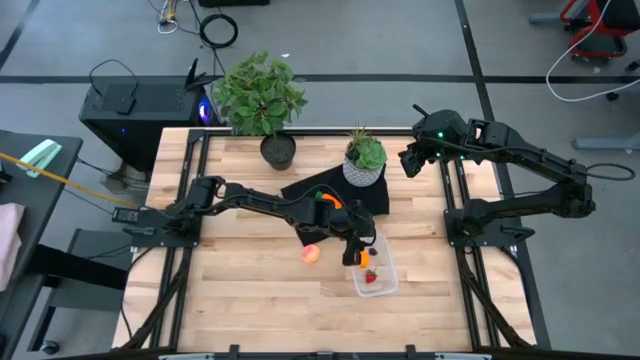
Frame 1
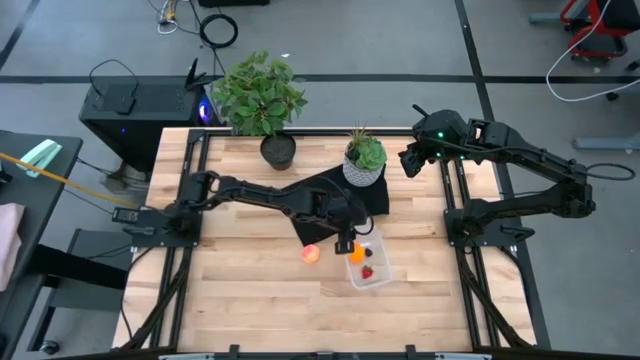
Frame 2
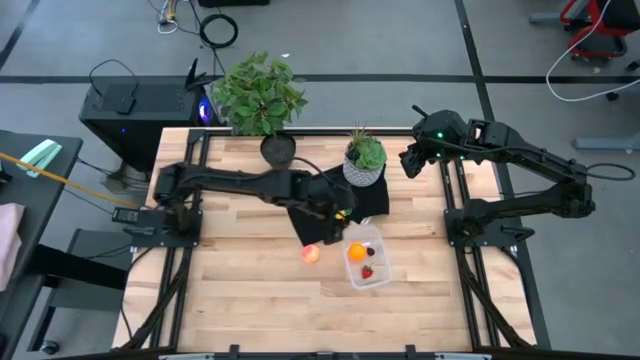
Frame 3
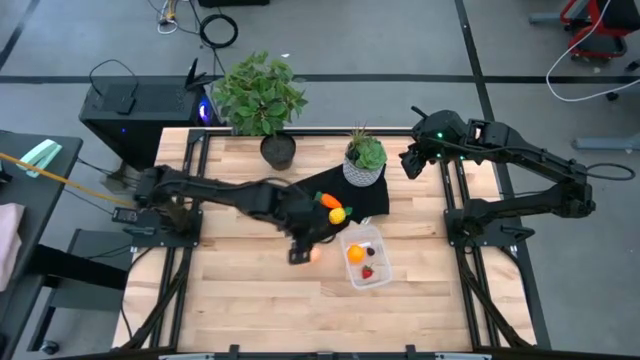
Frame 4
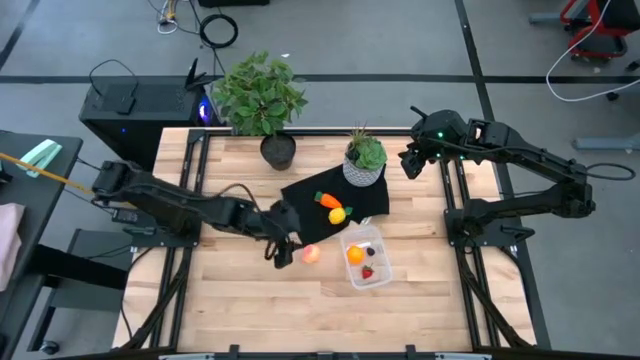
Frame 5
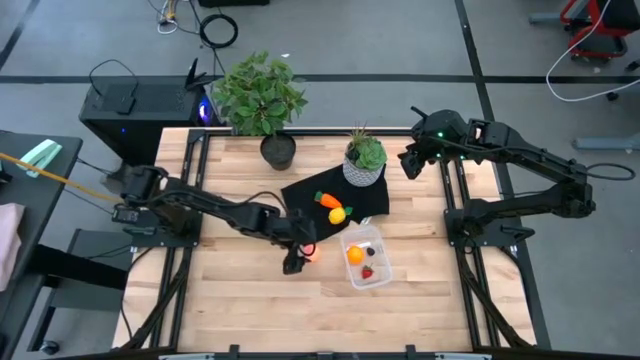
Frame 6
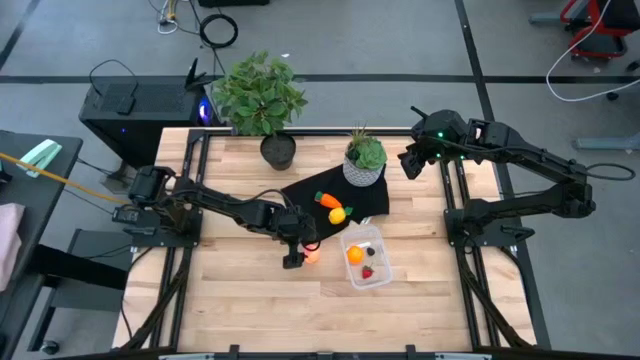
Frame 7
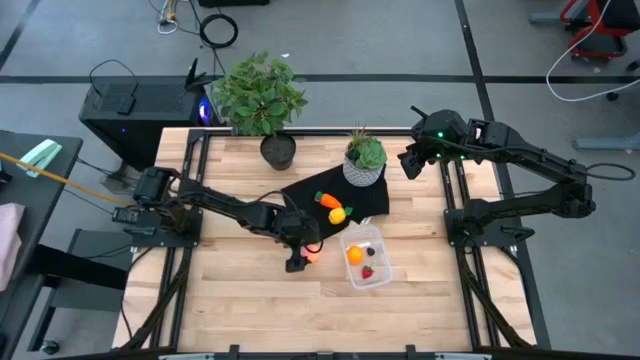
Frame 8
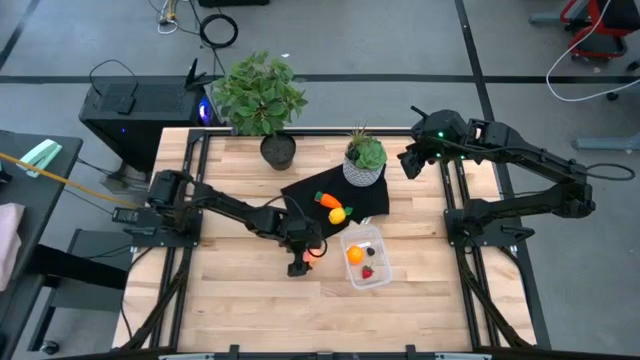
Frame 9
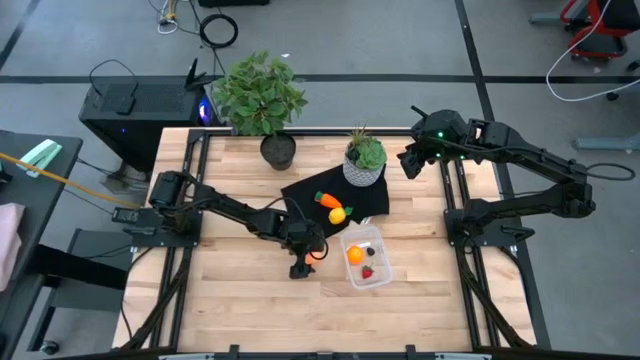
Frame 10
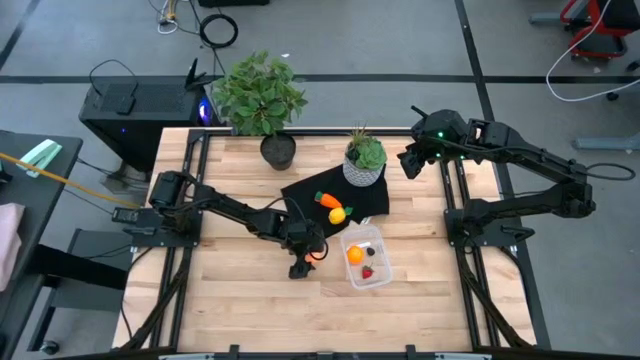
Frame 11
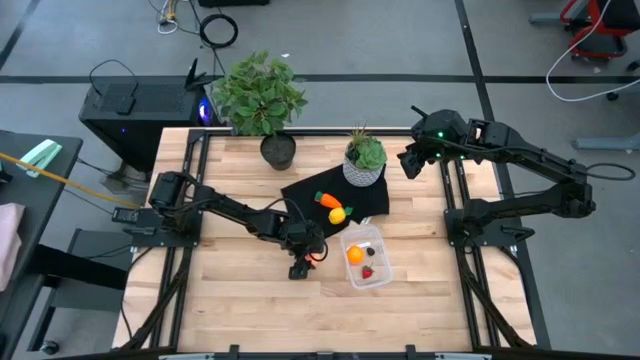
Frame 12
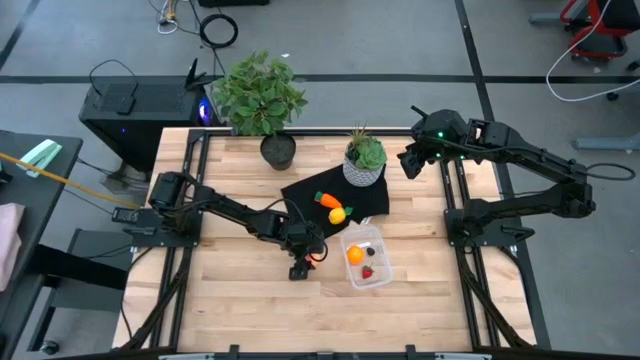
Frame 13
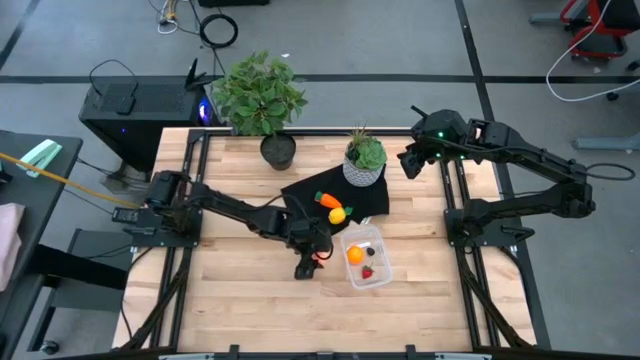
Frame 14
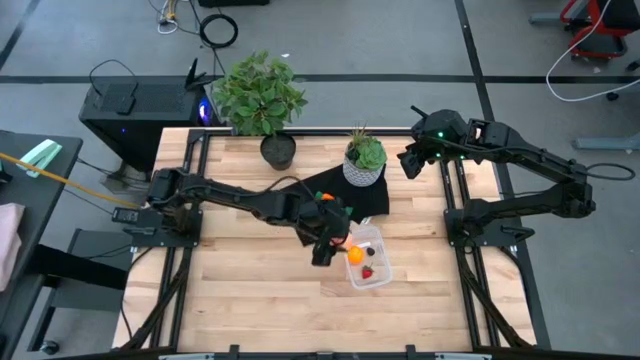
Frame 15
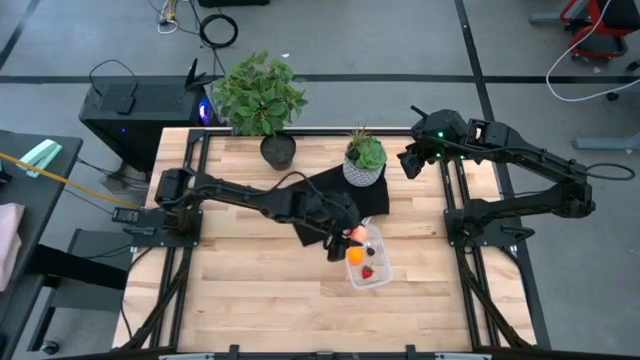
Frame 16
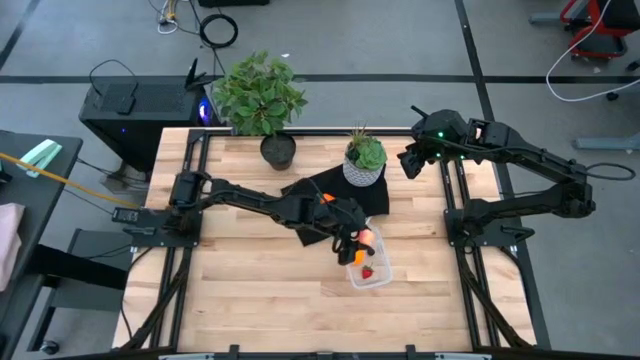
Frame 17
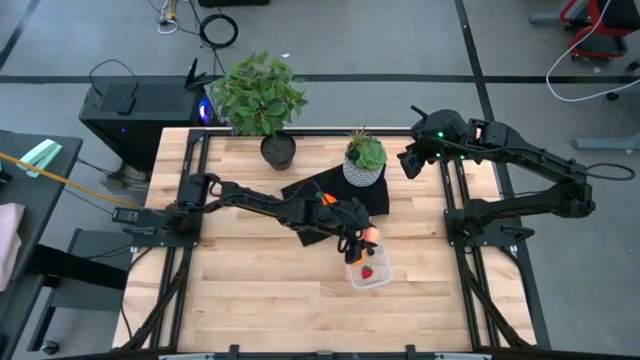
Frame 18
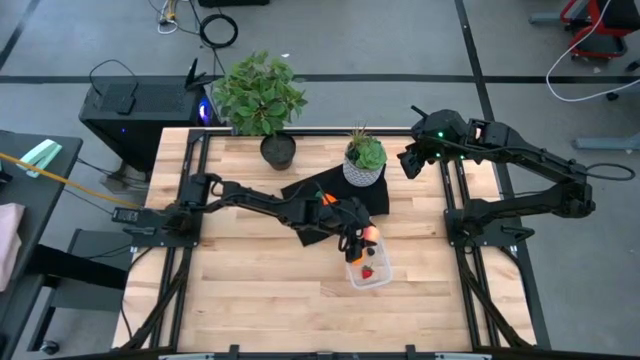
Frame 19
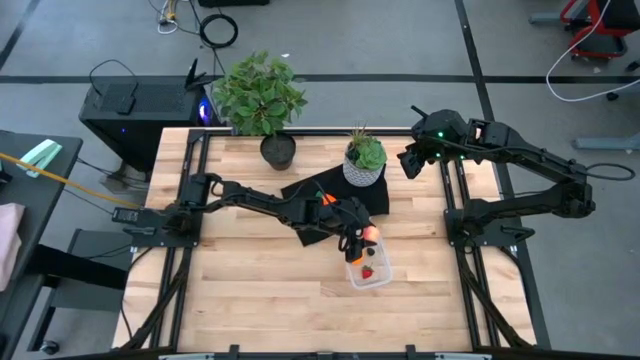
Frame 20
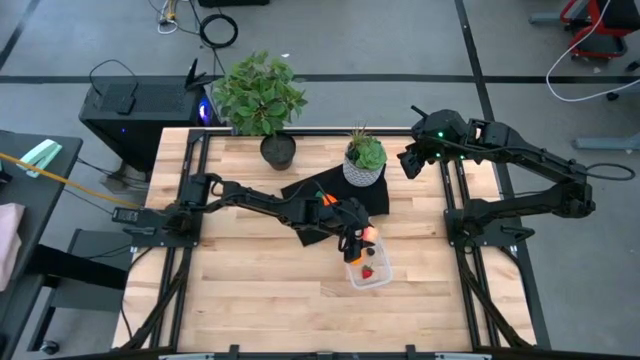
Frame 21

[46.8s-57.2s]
Task: Pick and placing Produce into tupperware
Put the peach into the transparent bin

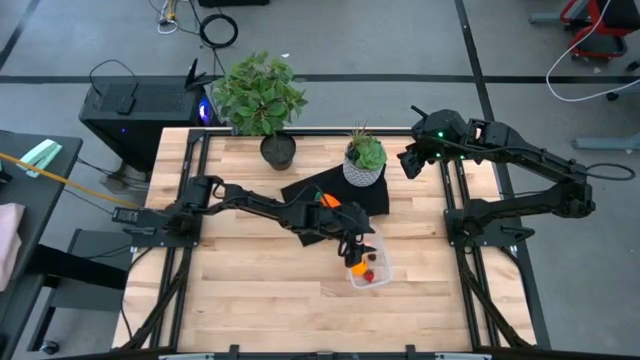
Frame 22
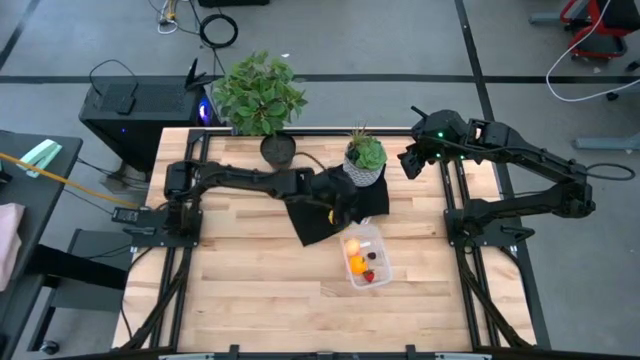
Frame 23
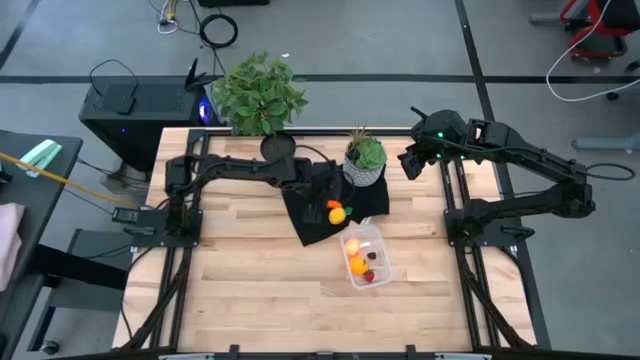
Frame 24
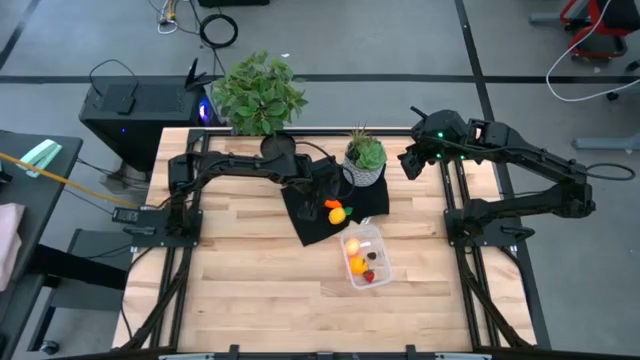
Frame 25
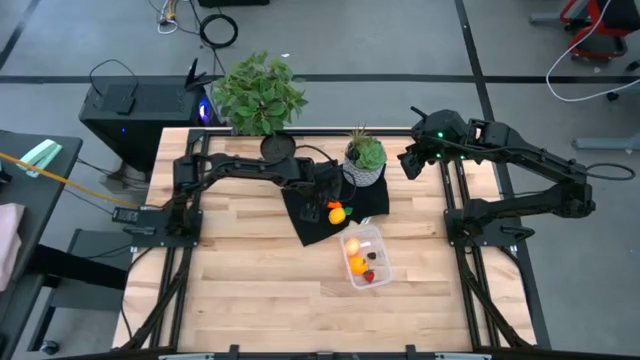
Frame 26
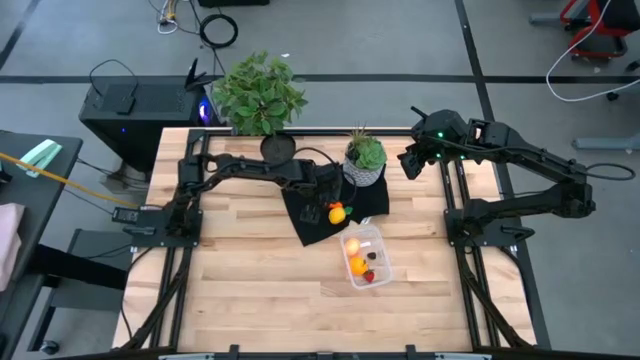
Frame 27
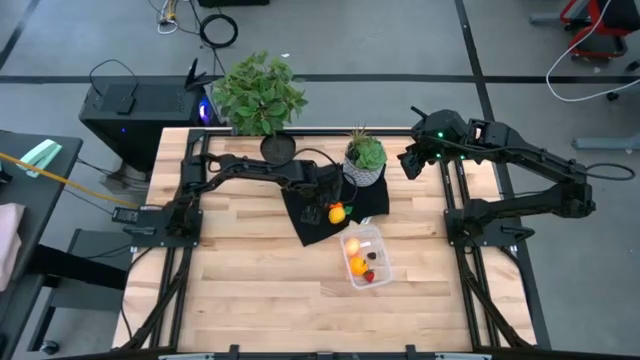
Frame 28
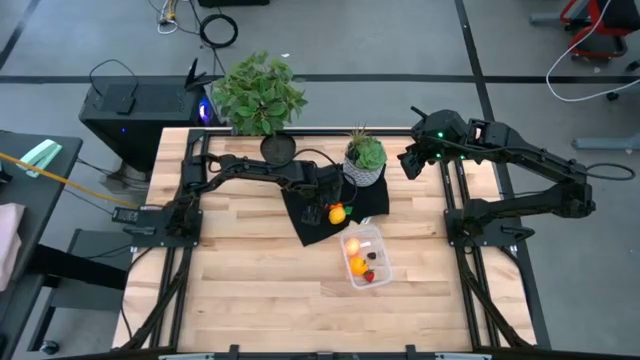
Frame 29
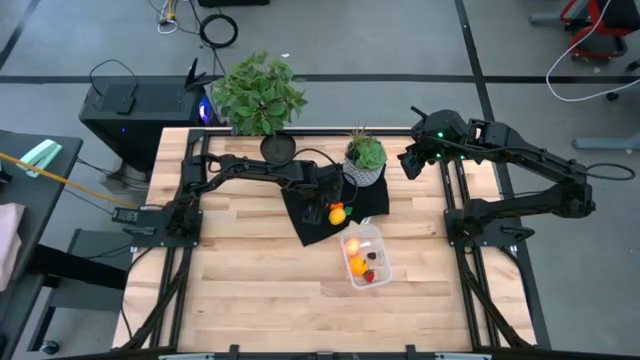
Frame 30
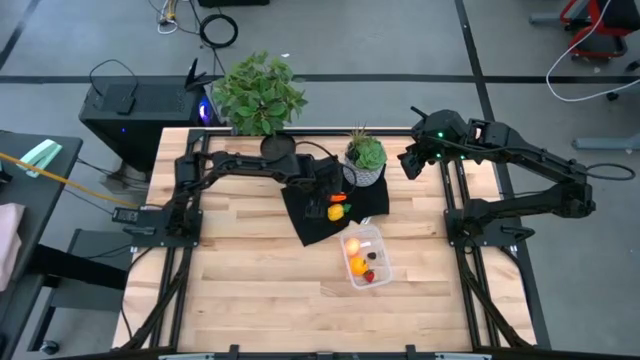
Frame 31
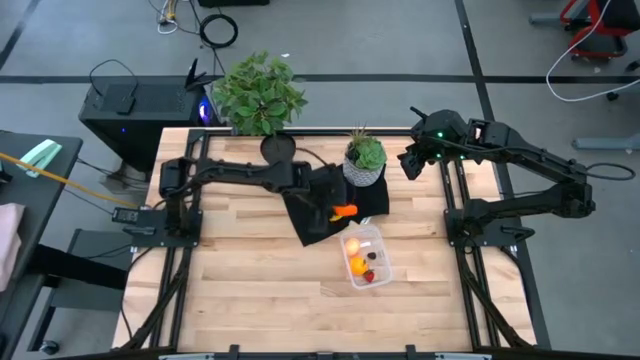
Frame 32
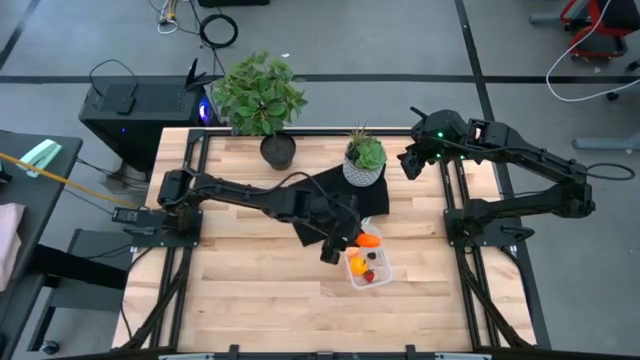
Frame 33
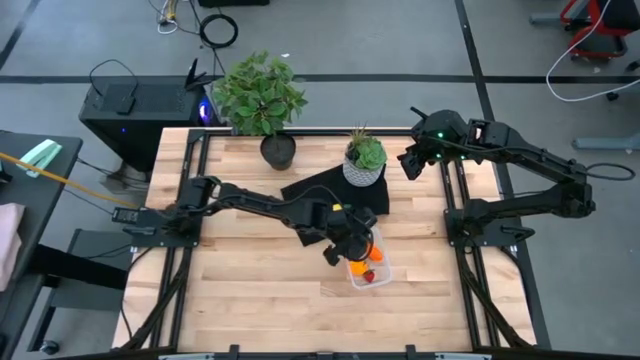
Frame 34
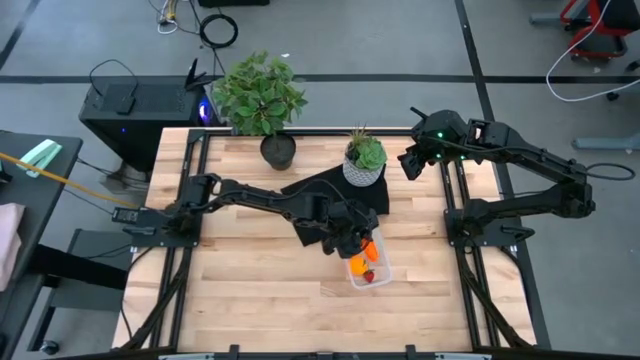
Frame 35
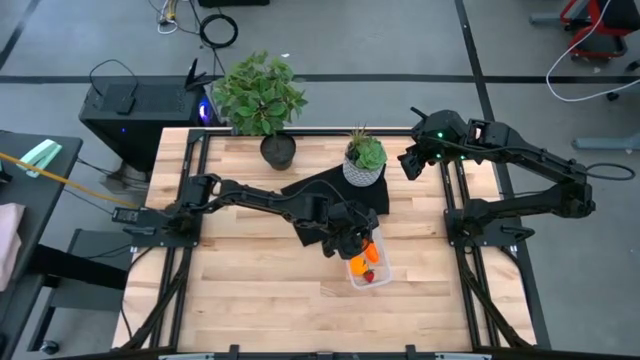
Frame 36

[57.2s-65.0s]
Put the carrot into the transparent bin

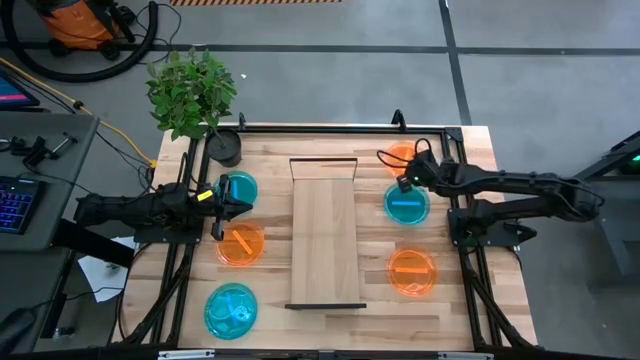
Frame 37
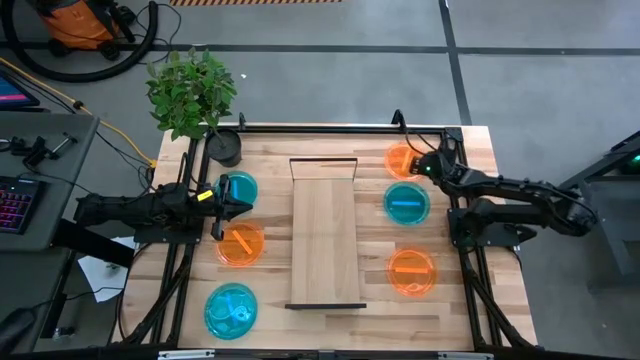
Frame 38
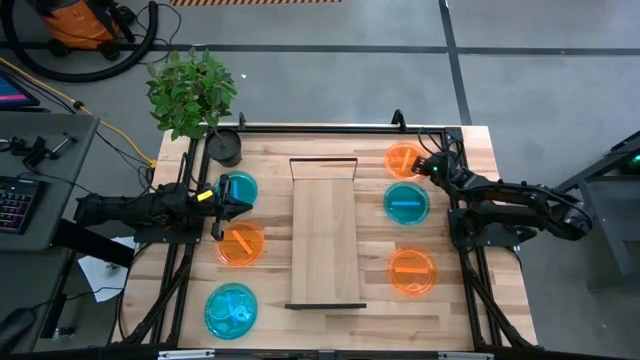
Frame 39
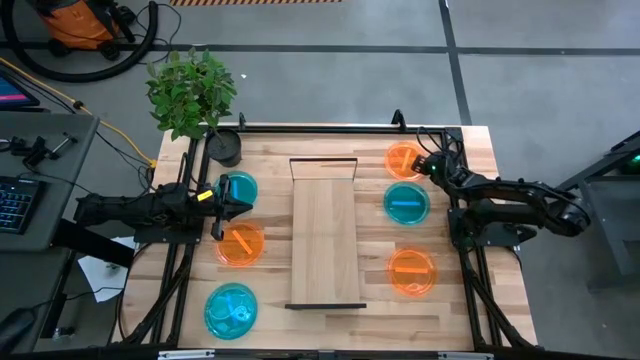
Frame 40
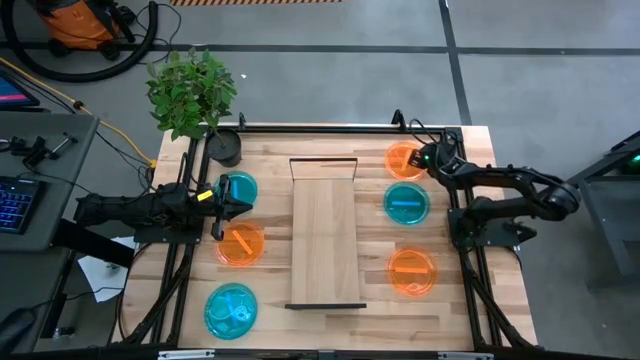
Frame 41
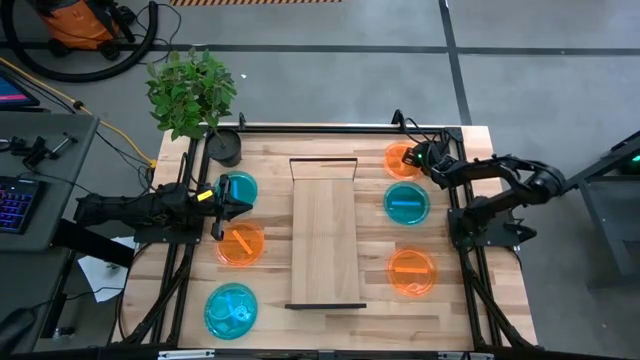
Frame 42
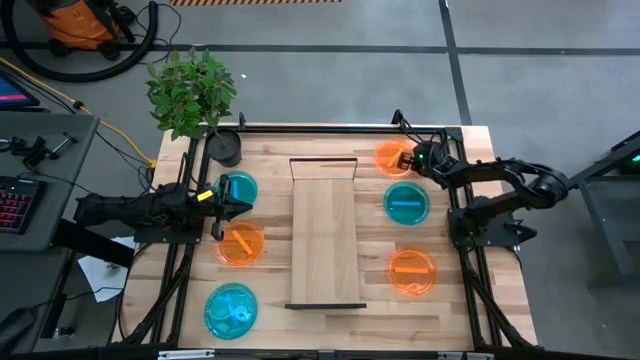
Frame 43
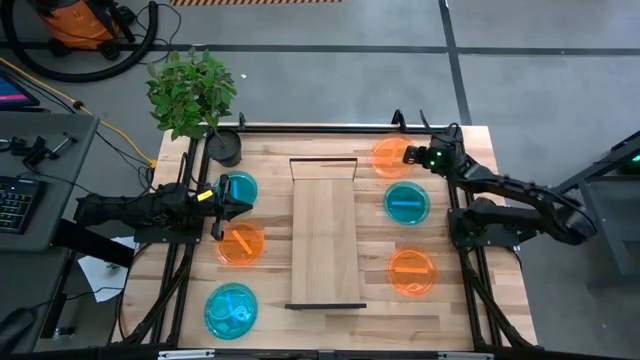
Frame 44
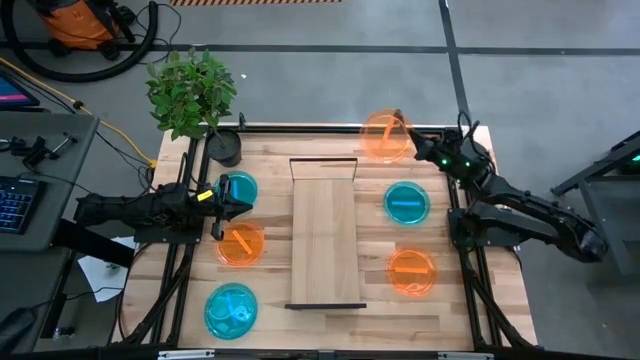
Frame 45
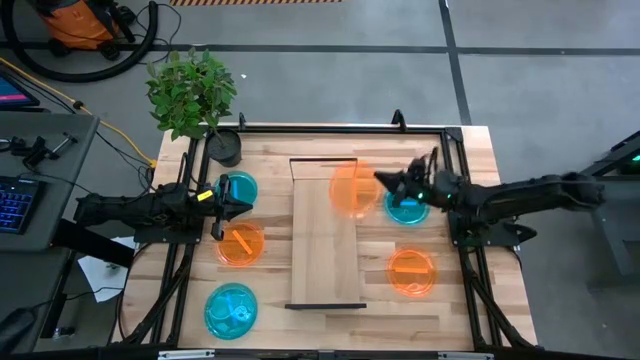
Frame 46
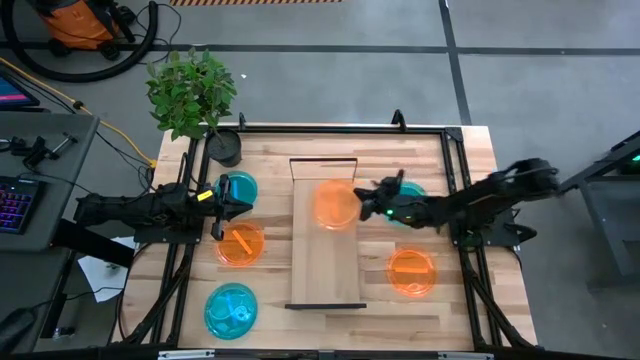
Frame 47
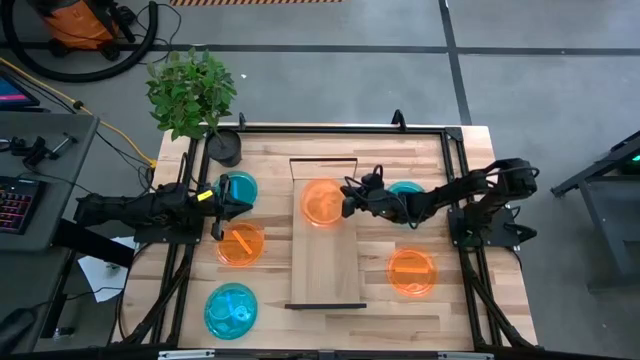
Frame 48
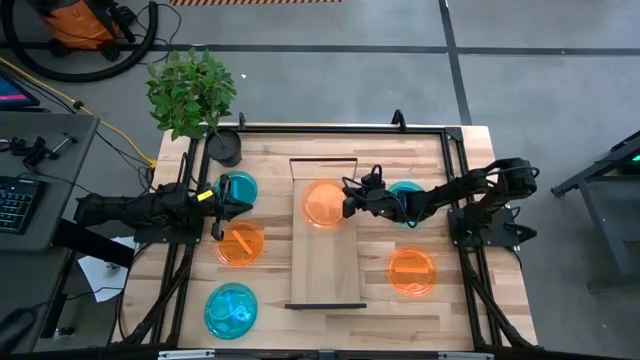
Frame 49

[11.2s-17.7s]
Task: Place and stack plates onto a shelf
Put the top right orange plate on the shelf
